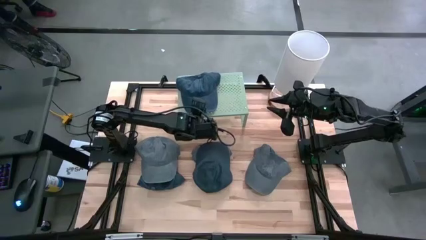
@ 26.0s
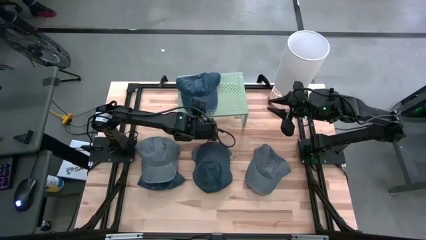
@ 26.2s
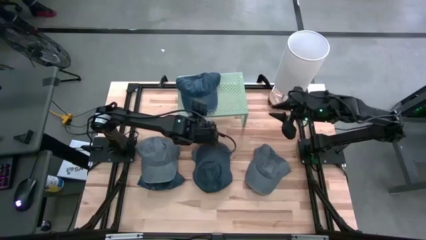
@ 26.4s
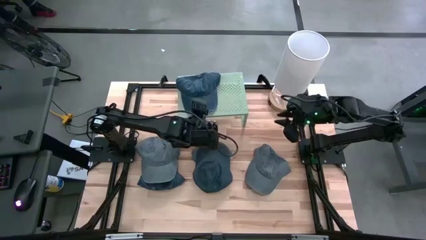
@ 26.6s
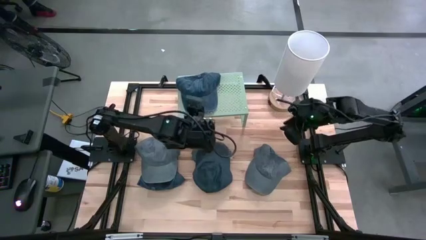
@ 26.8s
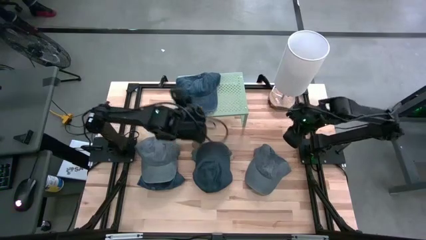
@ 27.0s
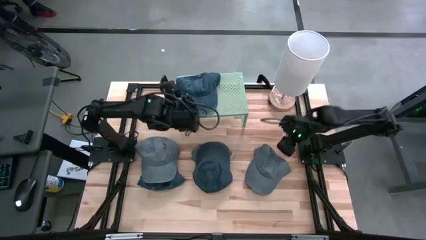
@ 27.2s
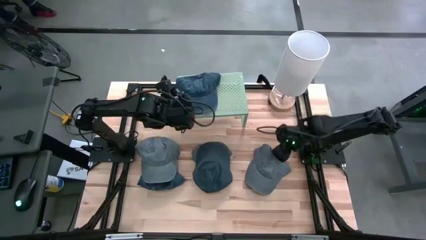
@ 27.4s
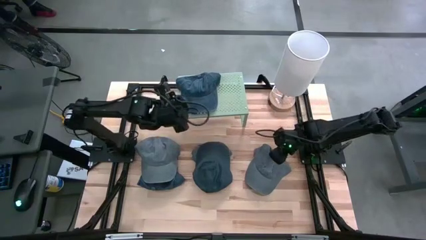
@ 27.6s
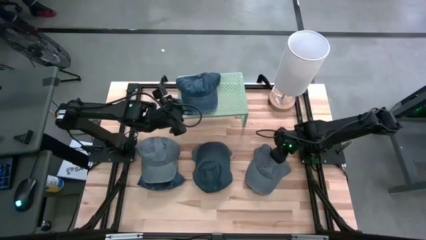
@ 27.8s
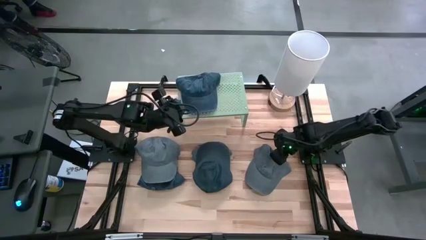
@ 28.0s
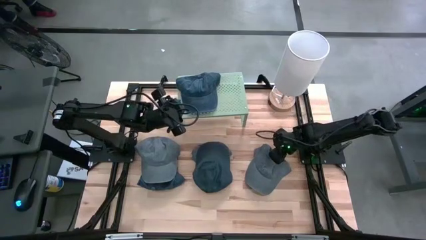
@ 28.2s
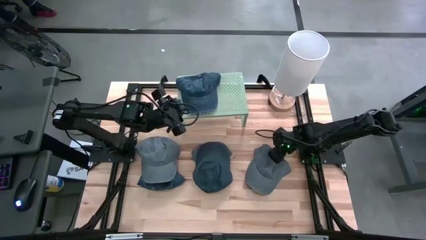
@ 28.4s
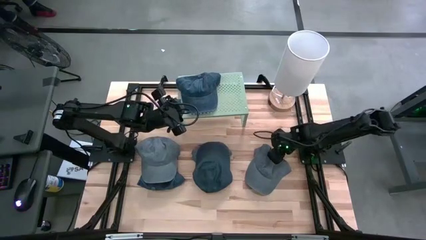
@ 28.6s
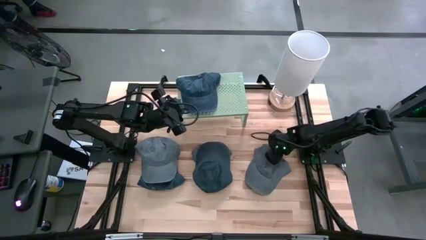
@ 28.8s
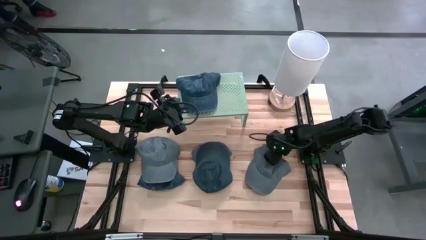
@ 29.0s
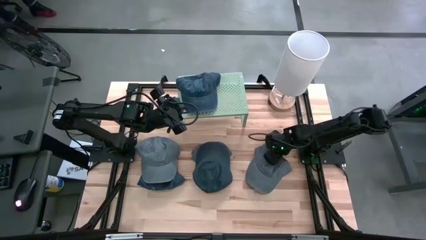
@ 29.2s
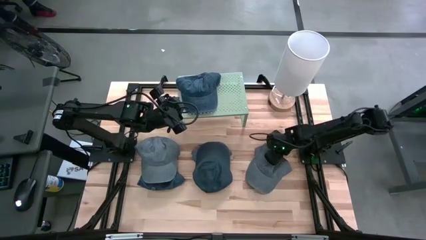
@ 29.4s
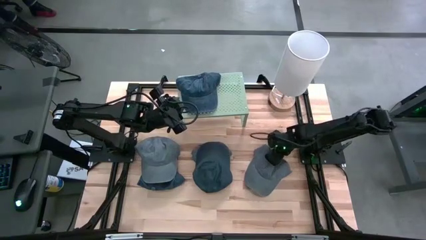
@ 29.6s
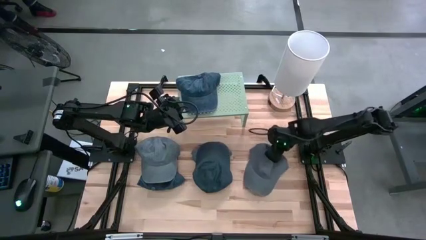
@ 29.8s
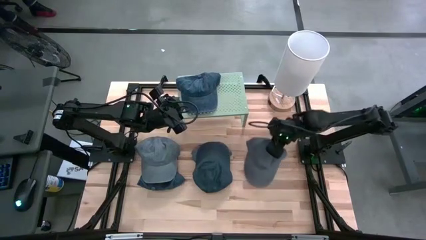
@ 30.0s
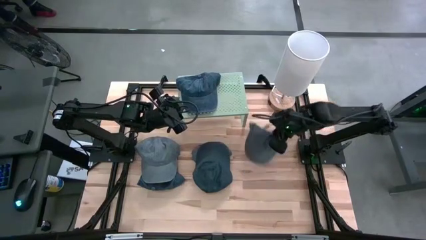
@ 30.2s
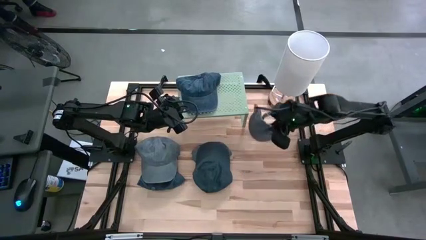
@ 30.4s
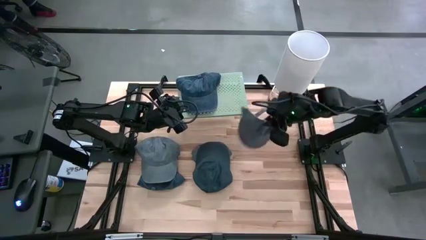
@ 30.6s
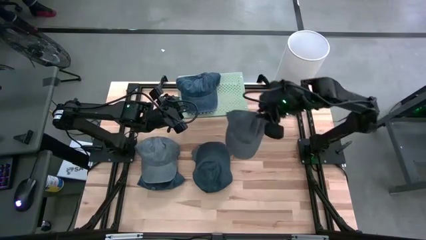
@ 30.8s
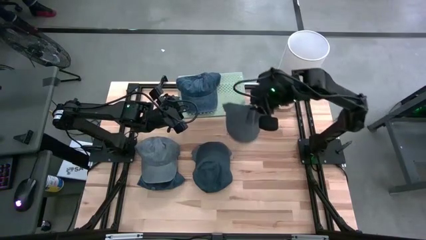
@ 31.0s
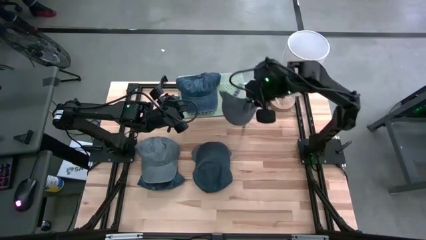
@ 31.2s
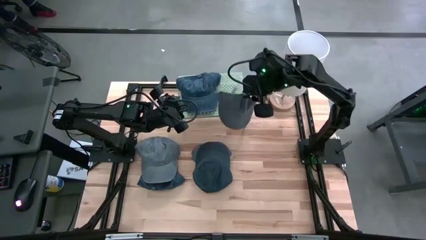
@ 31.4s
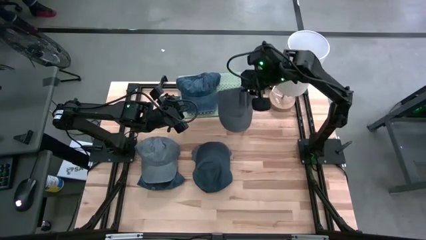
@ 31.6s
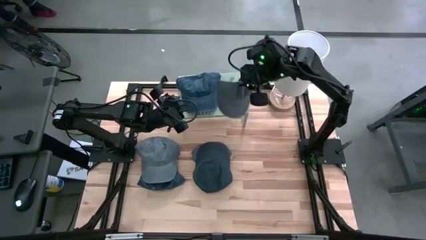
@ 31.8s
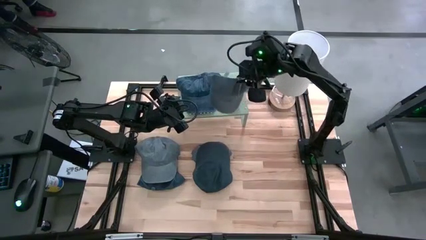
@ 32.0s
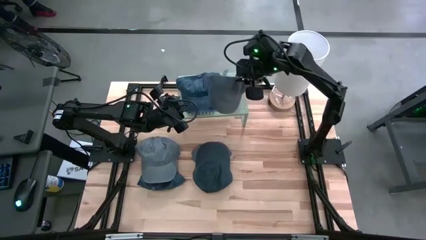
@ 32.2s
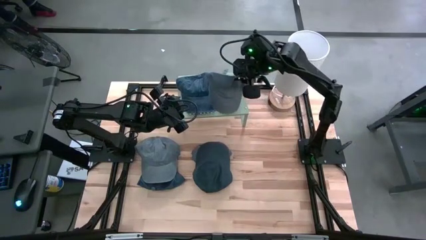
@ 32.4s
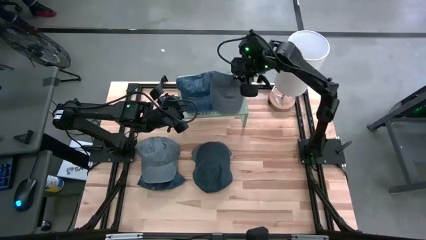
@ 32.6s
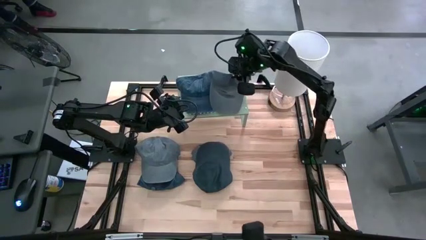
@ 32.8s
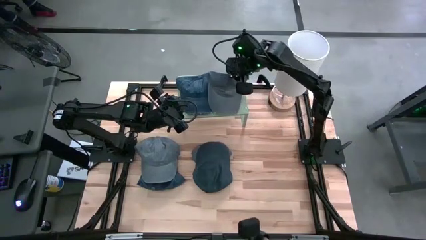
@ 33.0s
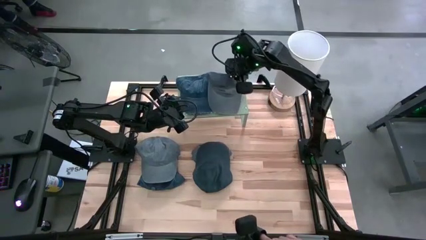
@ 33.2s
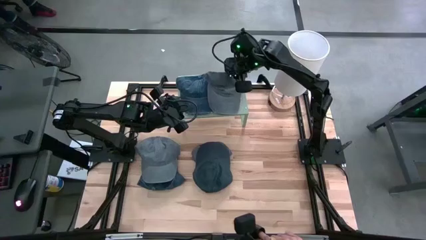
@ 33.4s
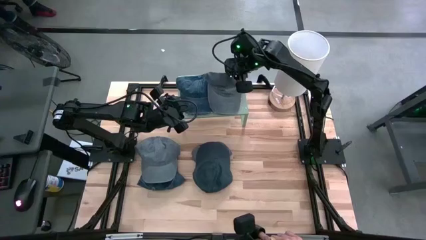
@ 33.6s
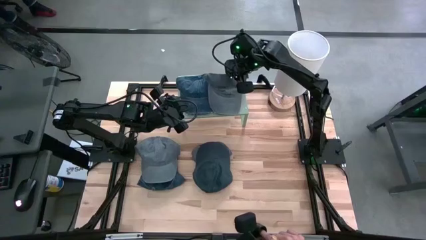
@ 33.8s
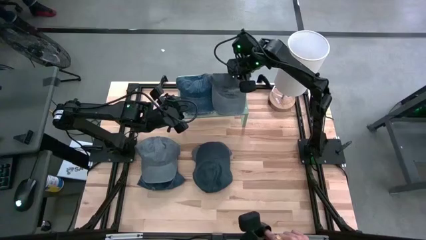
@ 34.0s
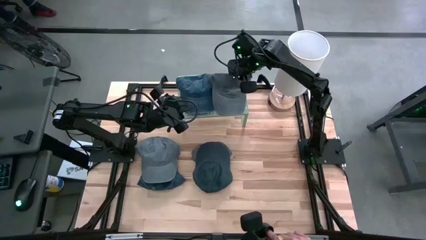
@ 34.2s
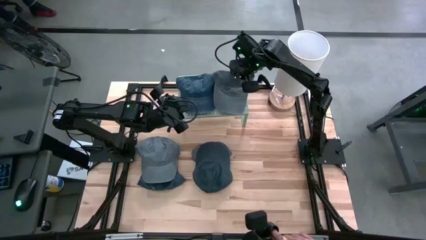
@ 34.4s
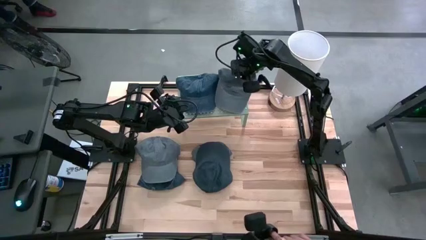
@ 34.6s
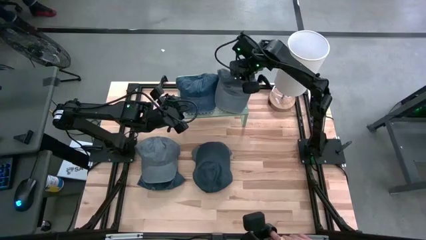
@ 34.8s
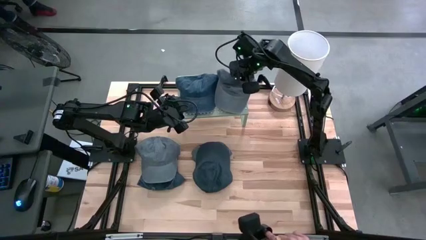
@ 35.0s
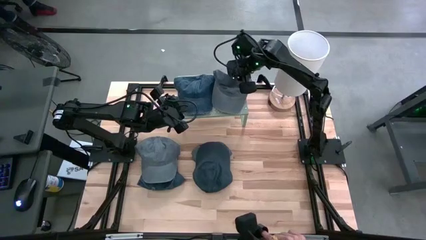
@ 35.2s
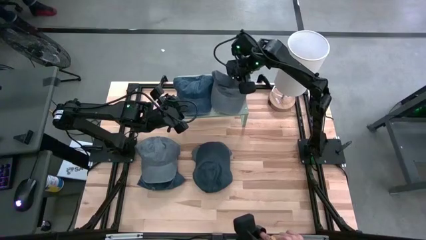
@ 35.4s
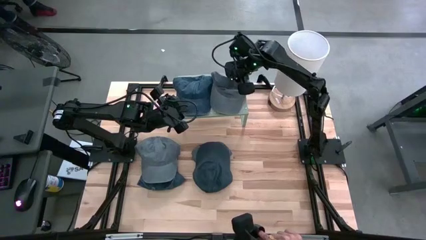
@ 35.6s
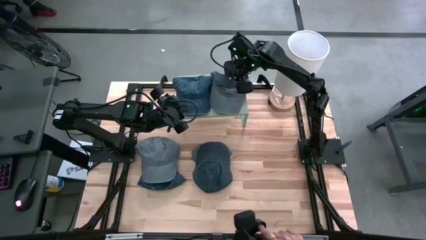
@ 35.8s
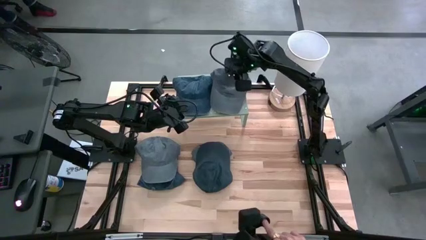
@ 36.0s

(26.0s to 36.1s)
Task: Pick & Place hat
Put the right gray cap on the shelf

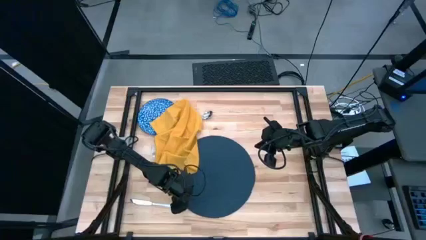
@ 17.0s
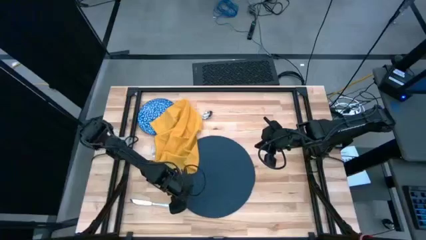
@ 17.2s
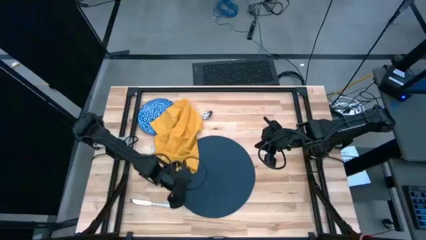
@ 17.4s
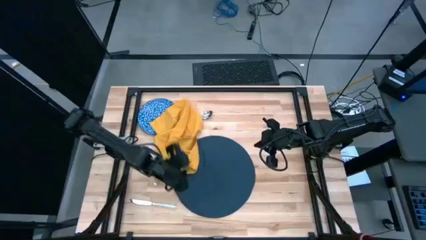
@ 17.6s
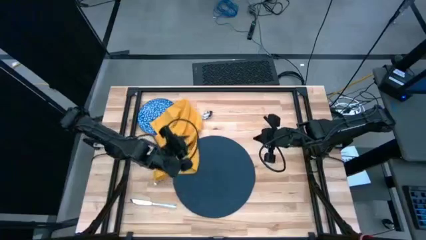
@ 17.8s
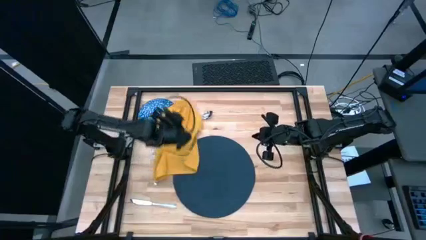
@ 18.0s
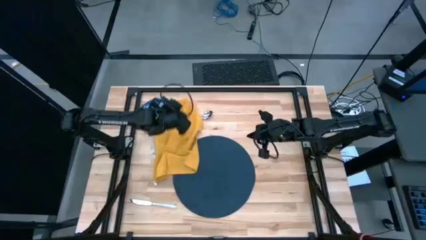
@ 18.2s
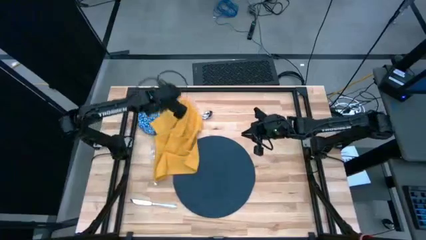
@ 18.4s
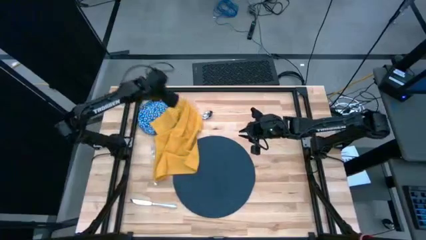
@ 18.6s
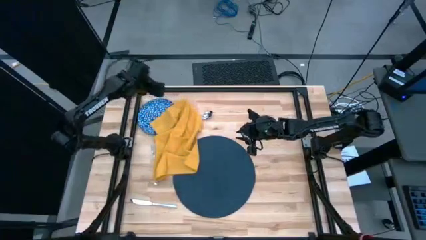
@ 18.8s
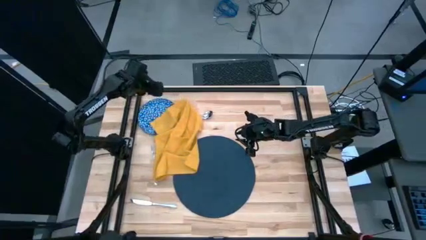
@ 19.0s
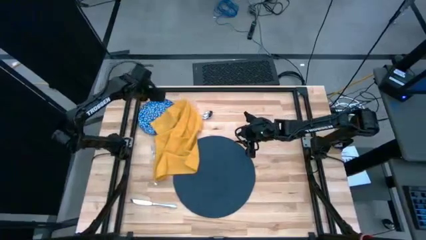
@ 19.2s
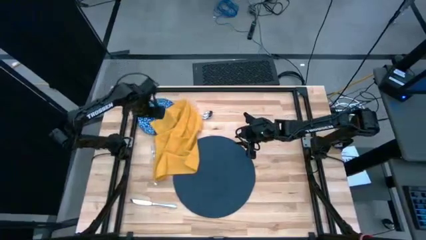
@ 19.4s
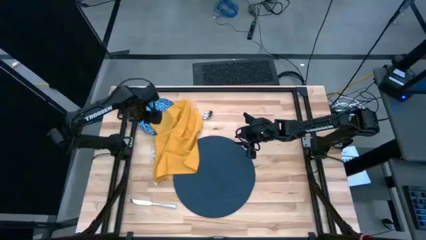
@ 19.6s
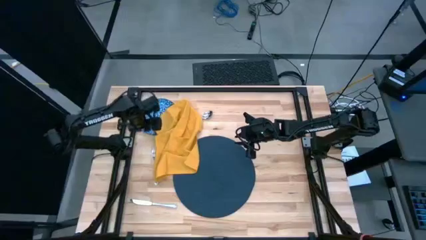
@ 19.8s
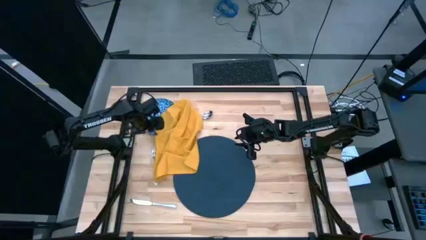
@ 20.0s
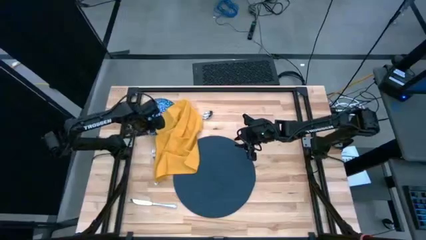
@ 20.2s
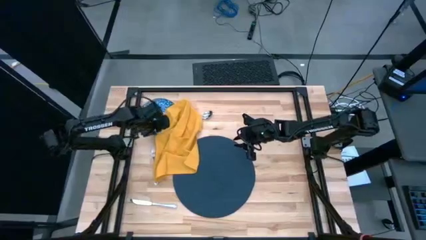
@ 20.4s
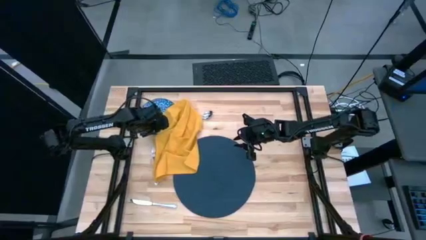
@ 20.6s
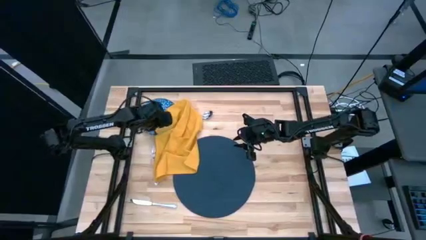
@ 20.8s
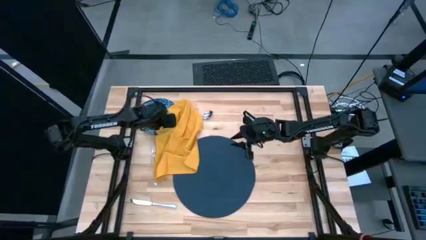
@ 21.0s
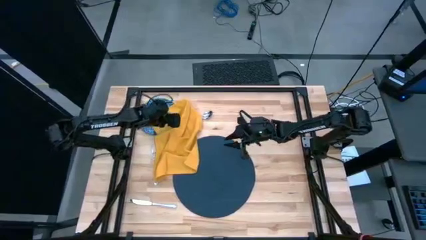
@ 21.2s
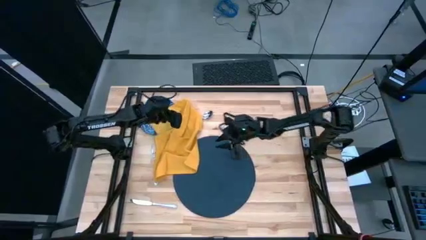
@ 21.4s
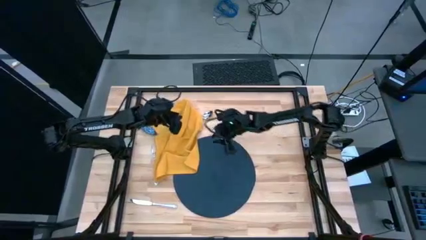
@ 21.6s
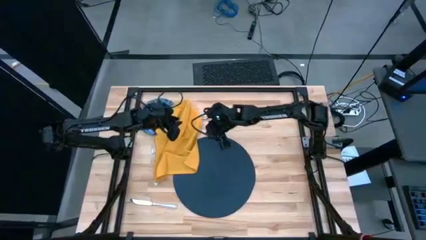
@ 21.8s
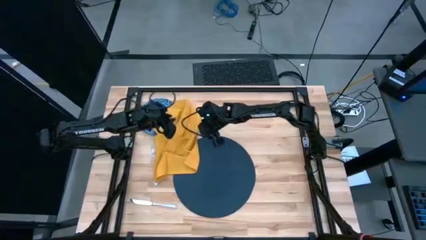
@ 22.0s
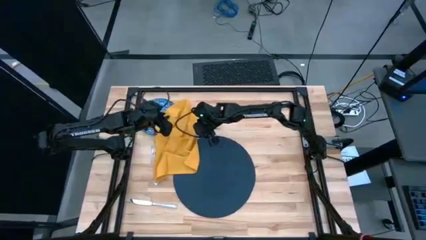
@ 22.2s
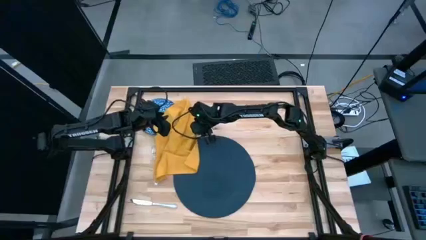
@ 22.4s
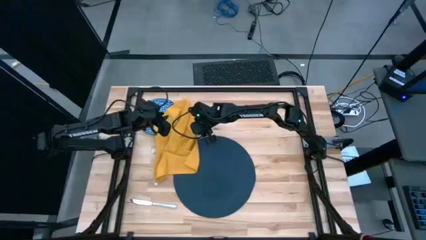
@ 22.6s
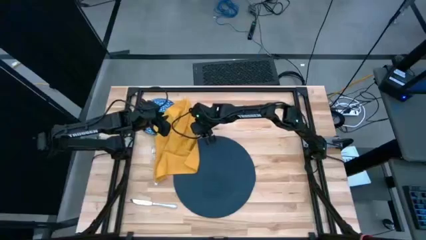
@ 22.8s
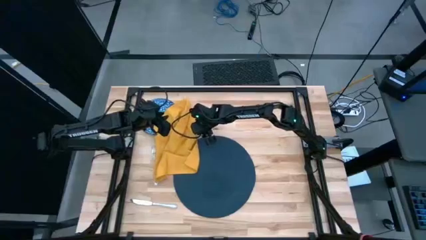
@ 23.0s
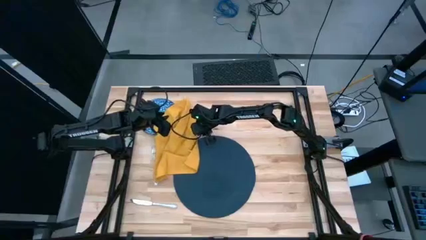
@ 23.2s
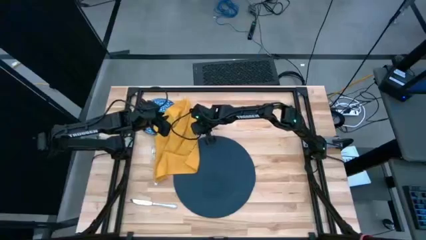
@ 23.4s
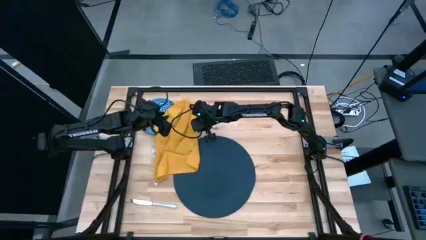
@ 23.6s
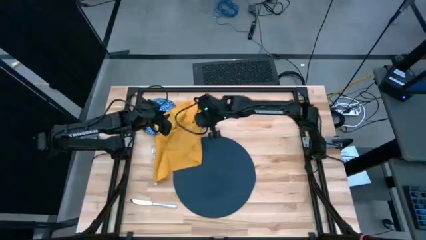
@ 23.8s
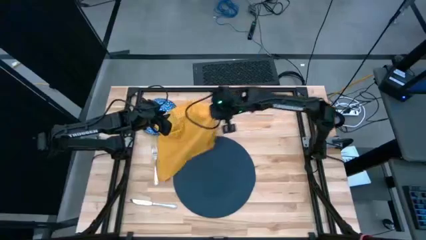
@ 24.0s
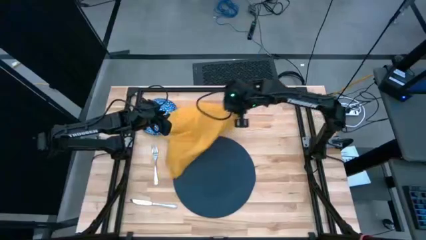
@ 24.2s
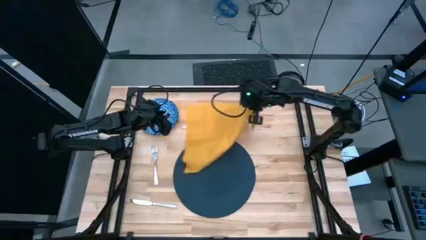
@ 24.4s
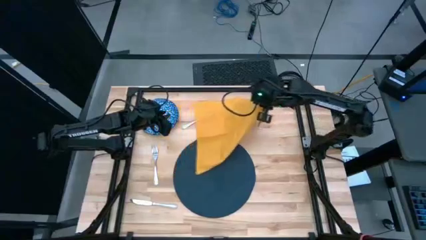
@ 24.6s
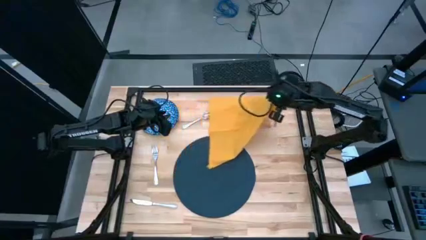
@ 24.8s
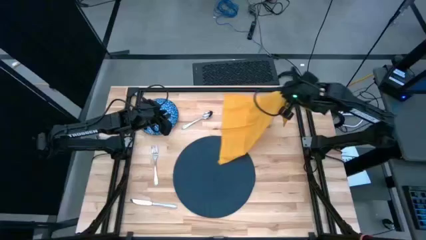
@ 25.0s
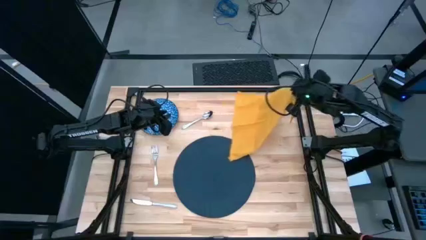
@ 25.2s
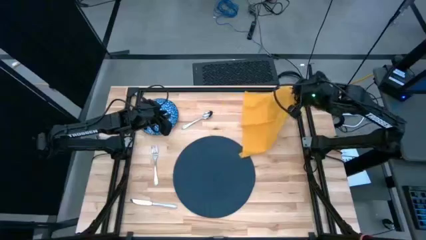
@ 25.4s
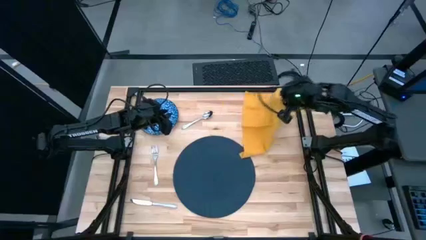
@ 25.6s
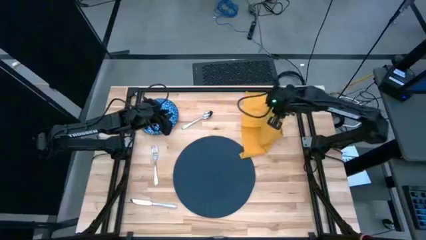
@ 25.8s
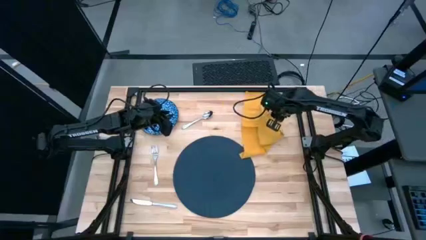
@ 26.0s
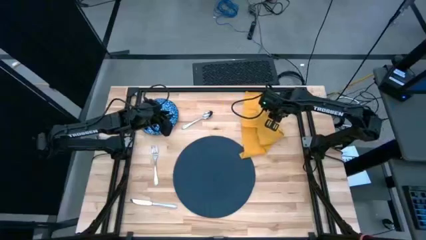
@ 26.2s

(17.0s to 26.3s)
Task: Set table place
Move the yellow table napkin to the top right of the table
